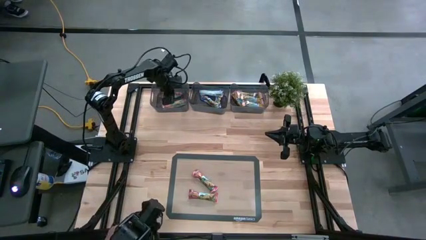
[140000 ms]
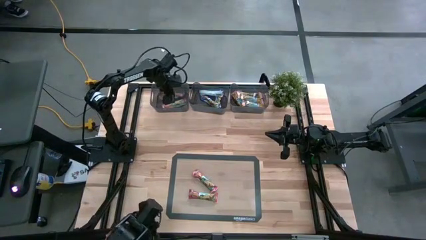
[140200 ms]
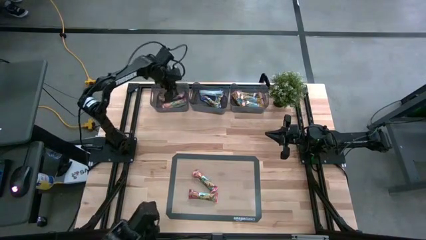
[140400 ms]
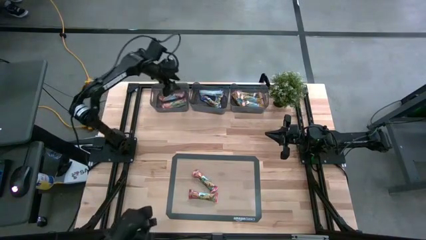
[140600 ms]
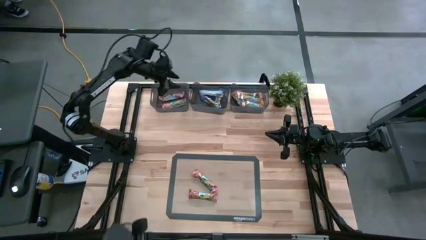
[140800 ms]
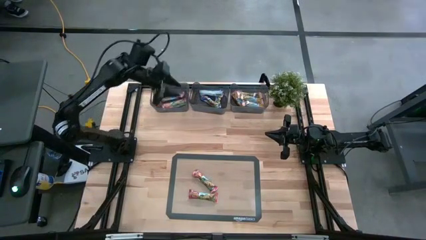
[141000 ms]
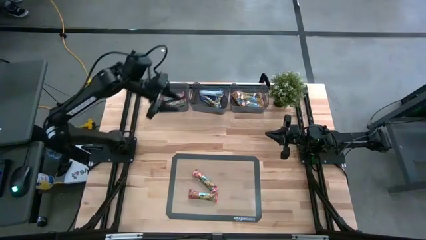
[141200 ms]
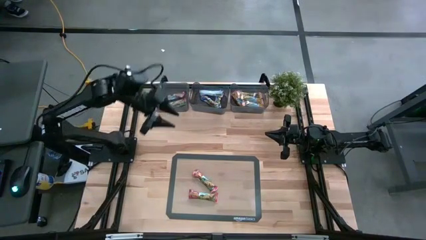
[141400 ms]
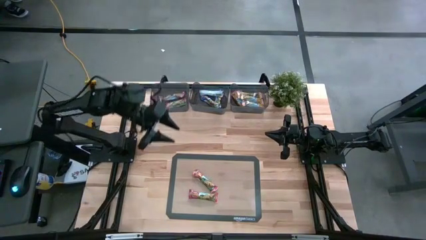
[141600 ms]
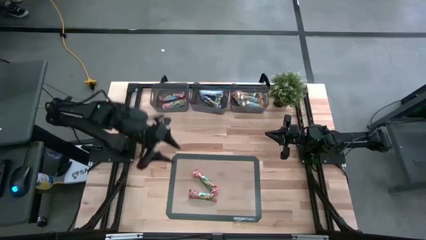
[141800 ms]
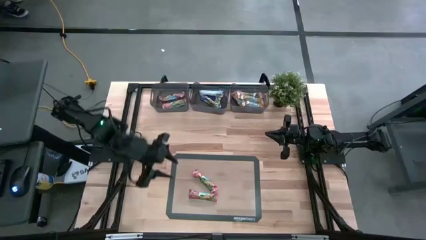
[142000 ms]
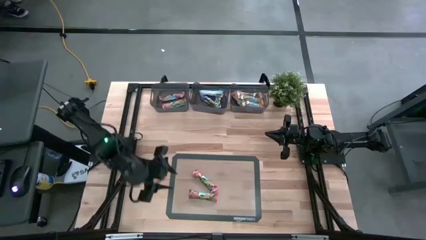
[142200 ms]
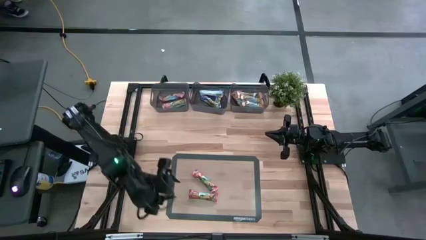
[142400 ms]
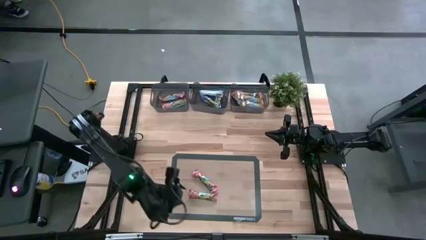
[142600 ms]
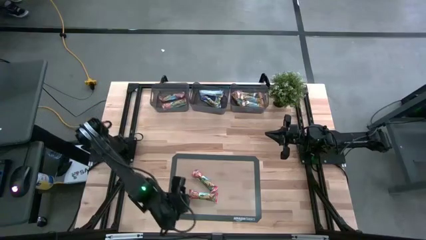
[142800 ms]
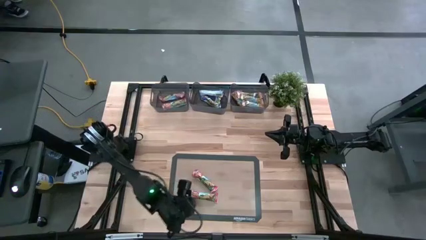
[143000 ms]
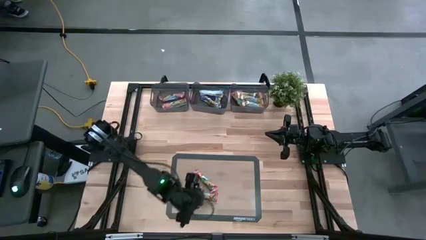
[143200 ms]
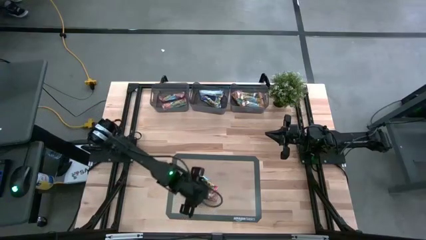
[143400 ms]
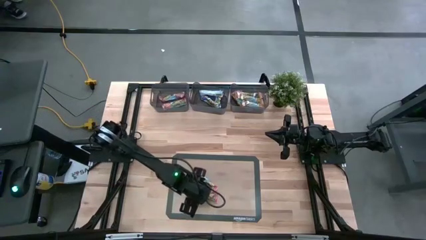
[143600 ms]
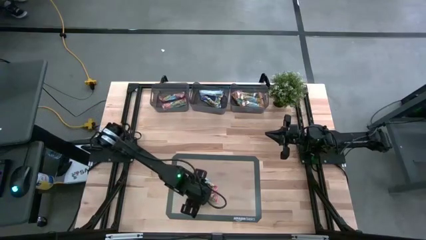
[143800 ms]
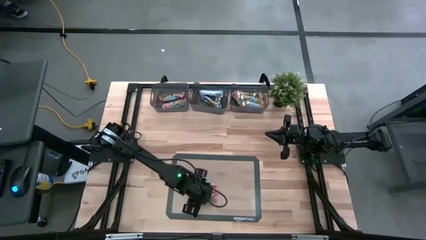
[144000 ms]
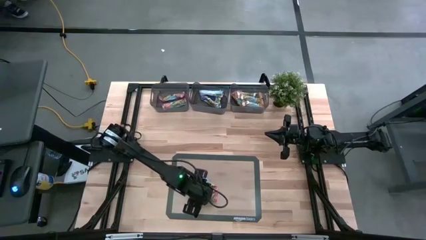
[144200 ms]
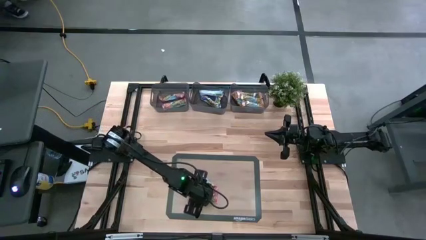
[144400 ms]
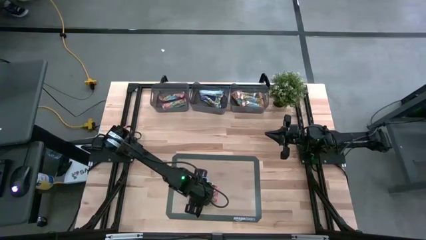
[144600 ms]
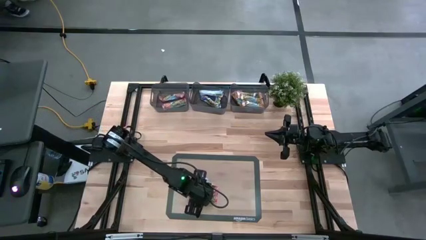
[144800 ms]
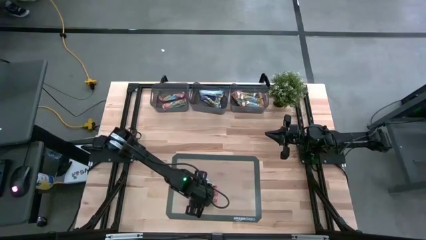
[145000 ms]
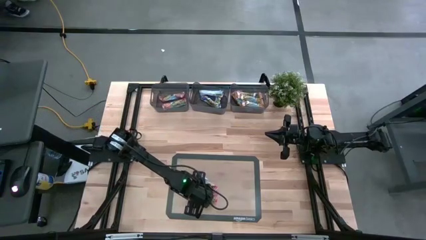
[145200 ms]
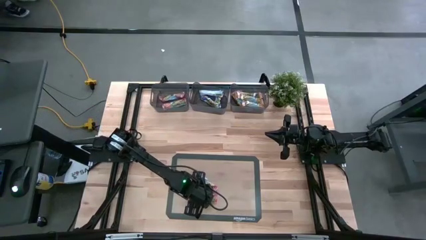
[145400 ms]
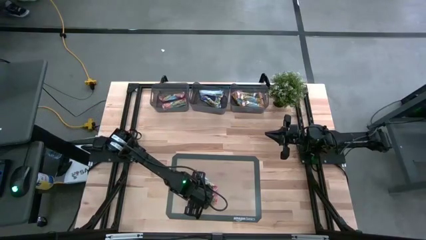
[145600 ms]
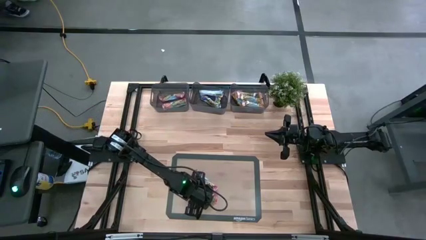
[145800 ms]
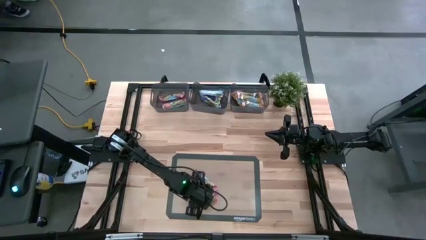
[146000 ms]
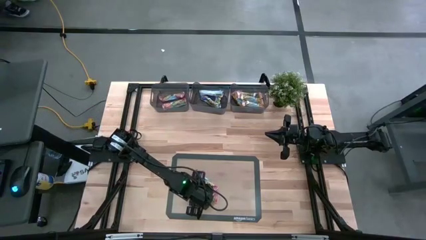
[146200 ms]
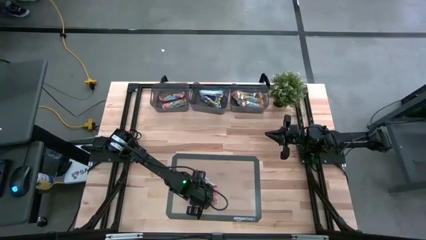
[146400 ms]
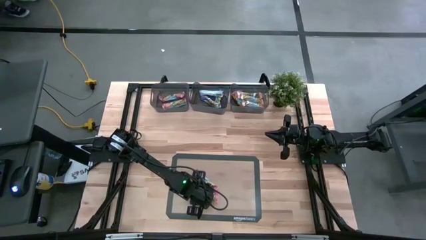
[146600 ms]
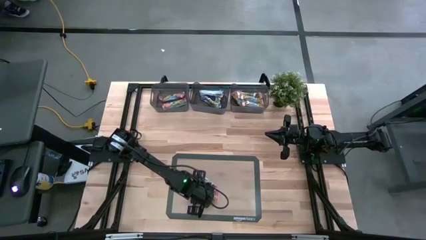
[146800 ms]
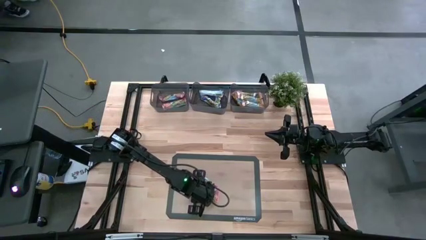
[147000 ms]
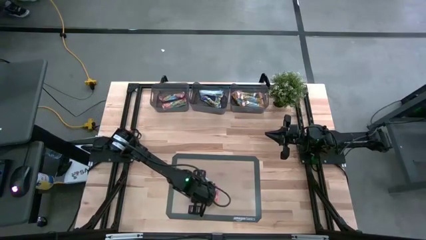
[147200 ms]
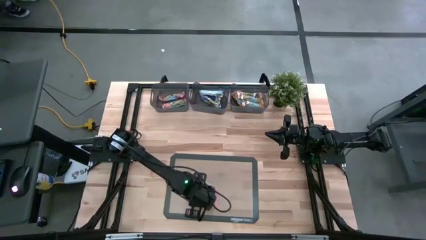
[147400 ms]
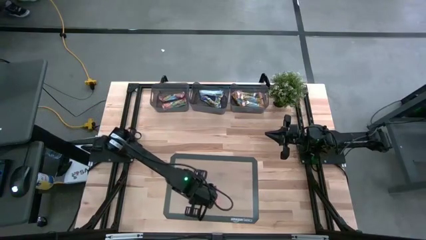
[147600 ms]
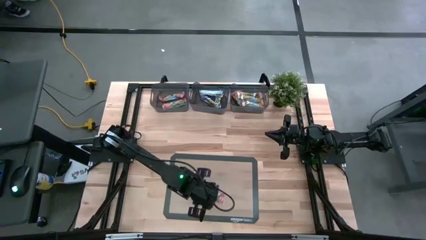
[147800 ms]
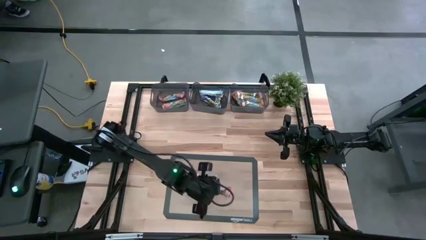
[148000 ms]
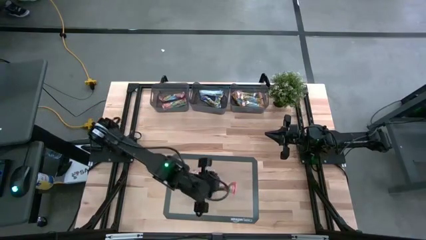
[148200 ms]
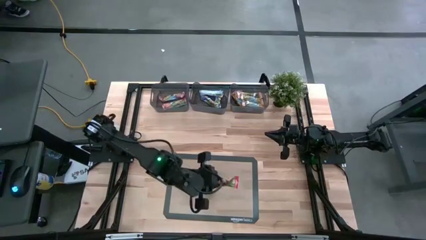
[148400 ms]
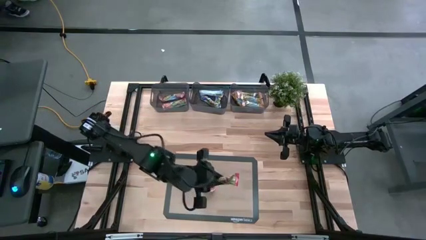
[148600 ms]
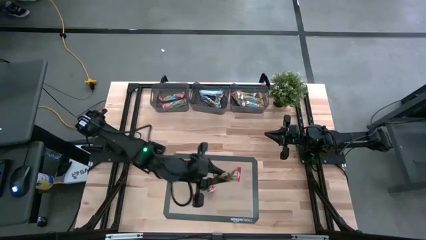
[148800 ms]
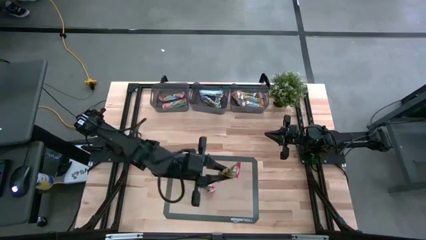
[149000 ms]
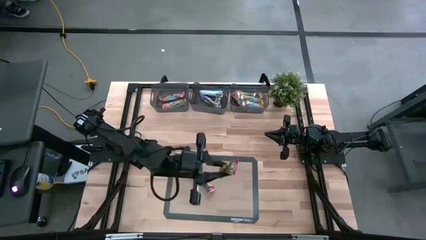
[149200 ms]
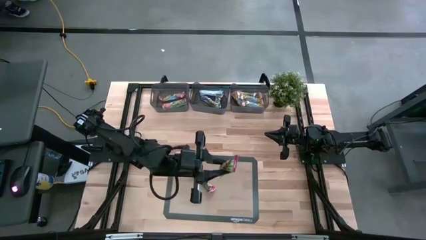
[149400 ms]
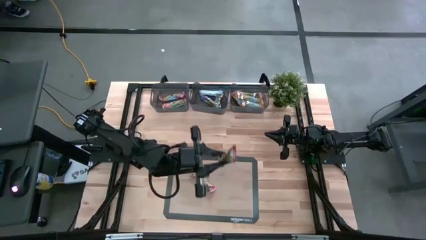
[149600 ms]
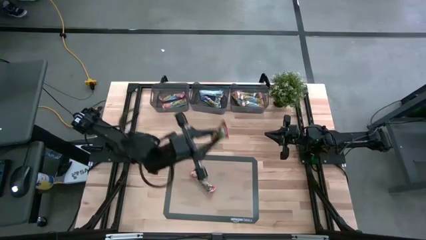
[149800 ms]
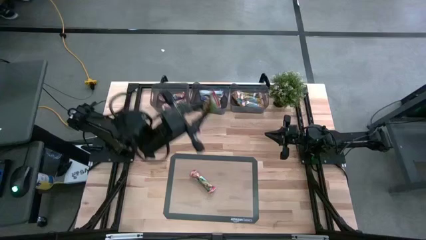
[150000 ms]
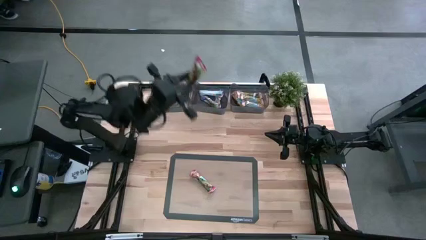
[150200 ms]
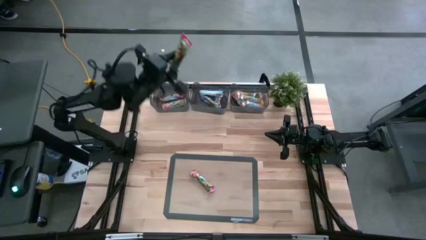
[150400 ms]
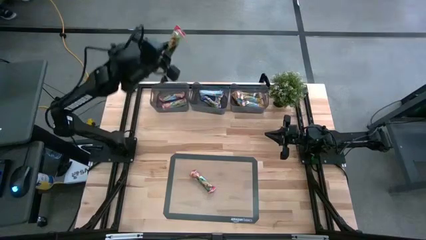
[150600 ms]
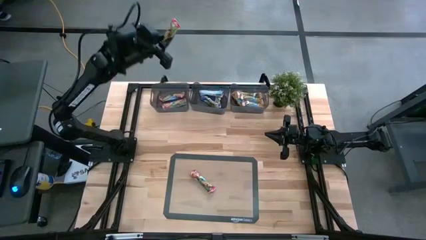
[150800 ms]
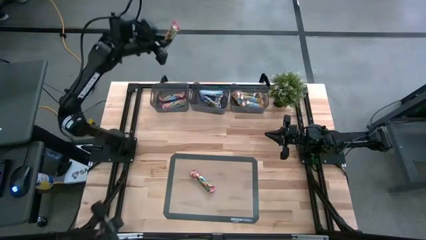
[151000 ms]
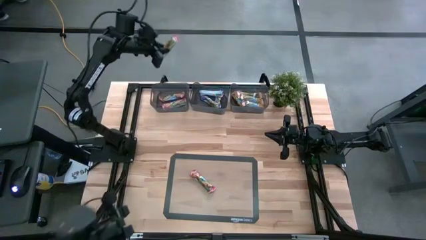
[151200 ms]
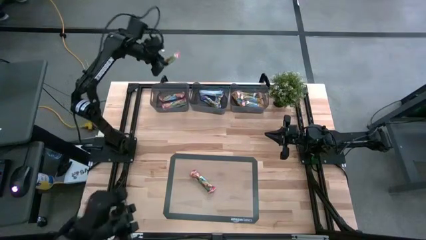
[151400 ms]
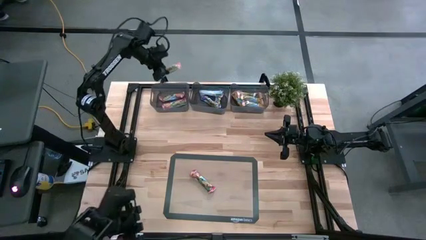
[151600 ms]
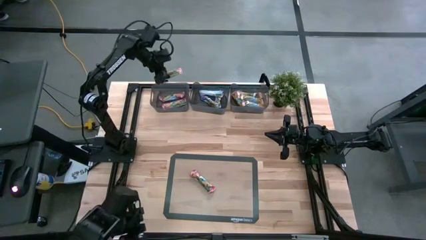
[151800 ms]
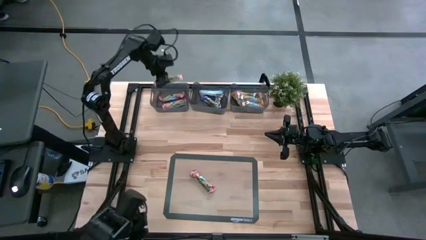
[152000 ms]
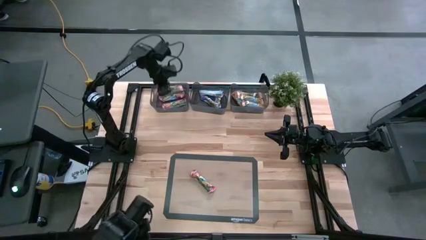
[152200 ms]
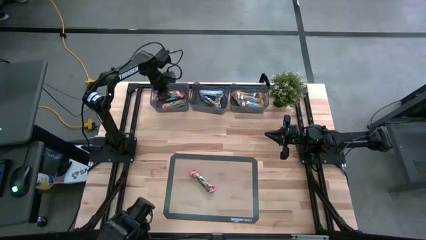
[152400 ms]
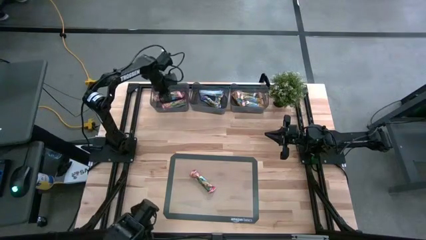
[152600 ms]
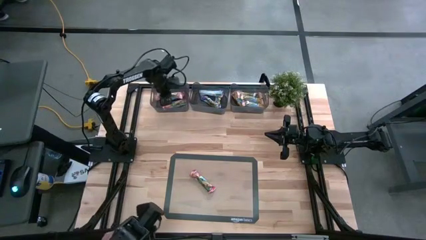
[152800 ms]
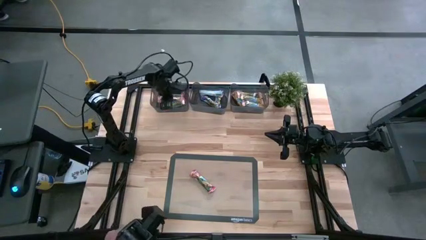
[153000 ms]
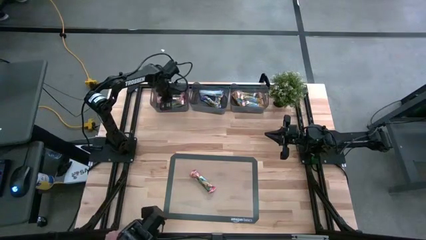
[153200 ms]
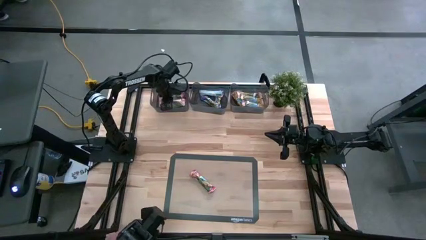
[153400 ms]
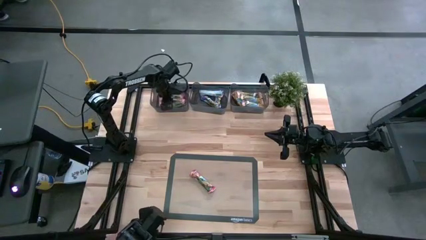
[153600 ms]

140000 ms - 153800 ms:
Task: Pick and place Granola Bars by type
Put the red granola bar into the left black bin

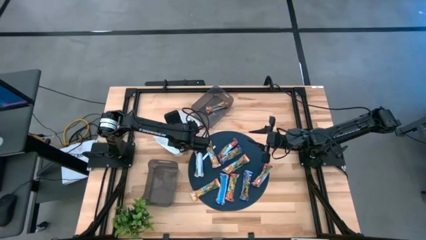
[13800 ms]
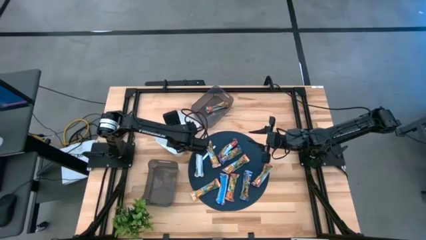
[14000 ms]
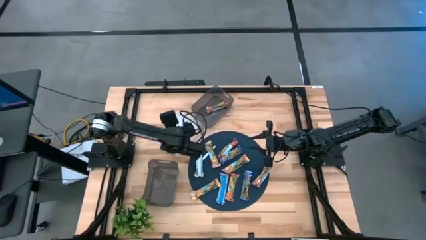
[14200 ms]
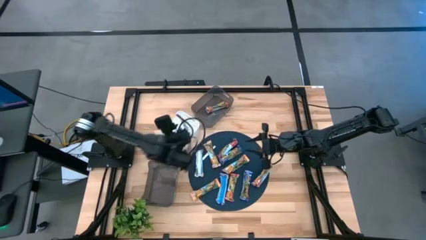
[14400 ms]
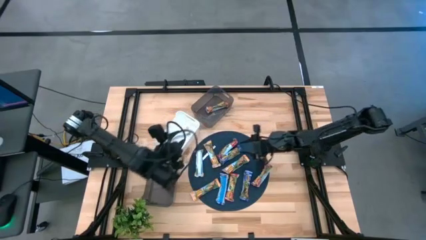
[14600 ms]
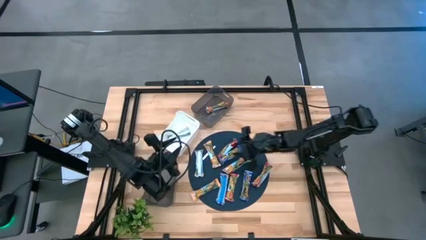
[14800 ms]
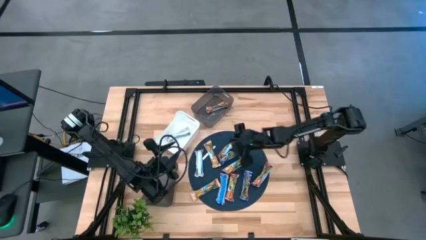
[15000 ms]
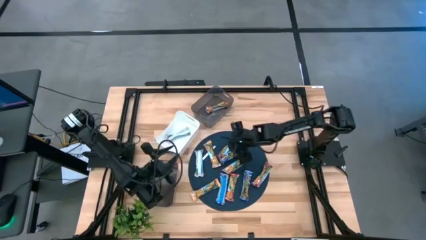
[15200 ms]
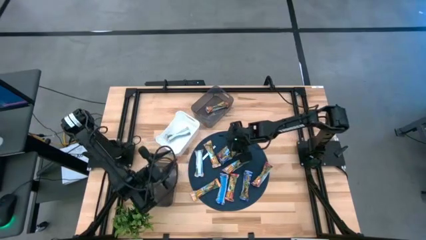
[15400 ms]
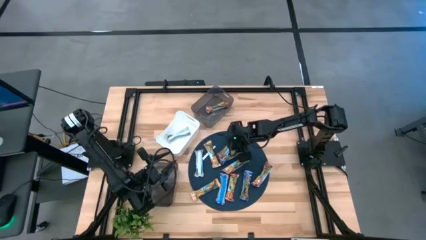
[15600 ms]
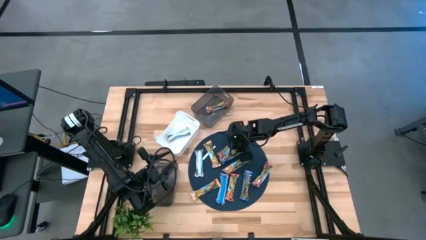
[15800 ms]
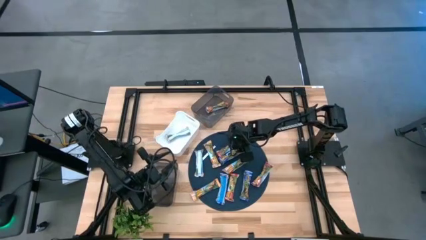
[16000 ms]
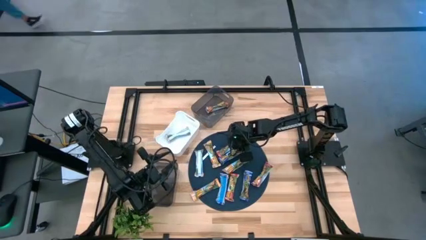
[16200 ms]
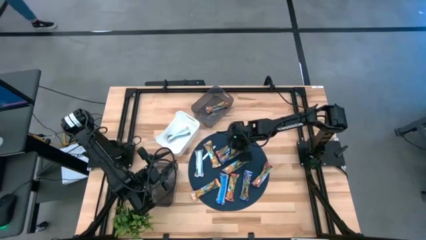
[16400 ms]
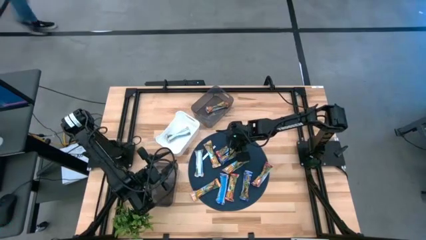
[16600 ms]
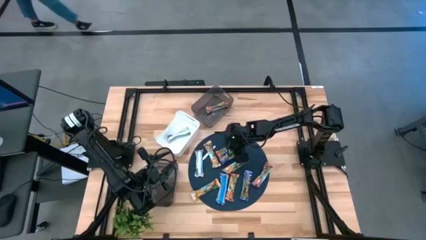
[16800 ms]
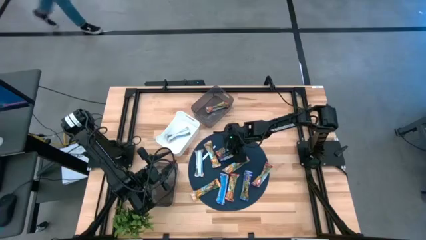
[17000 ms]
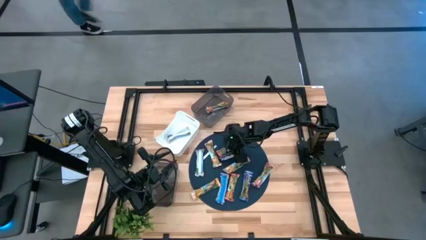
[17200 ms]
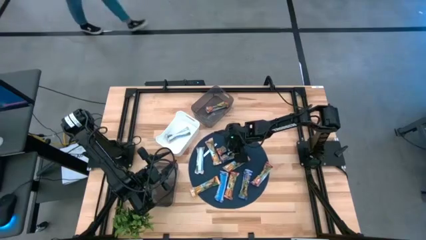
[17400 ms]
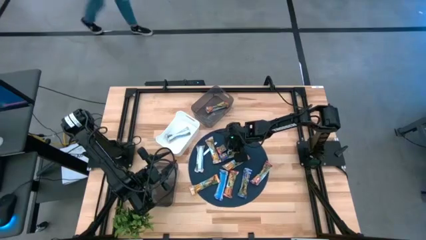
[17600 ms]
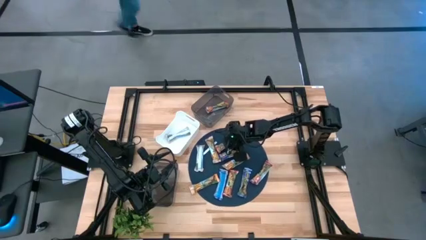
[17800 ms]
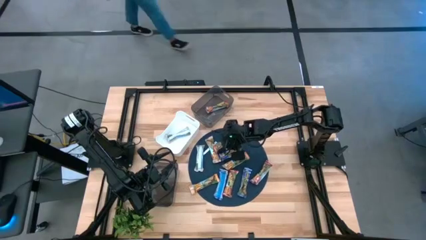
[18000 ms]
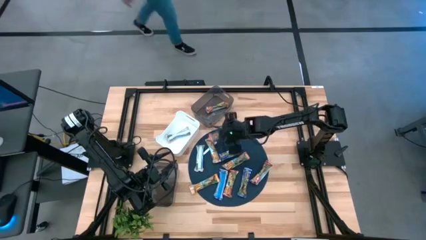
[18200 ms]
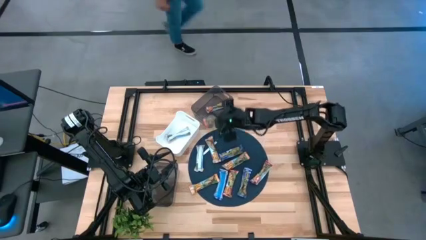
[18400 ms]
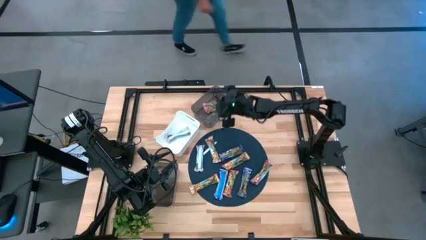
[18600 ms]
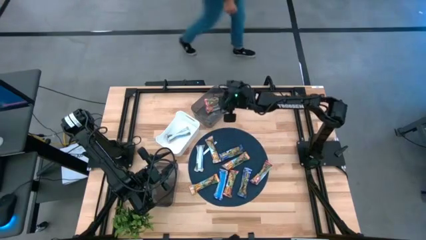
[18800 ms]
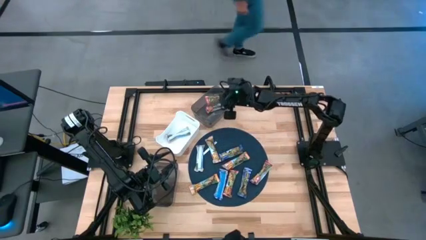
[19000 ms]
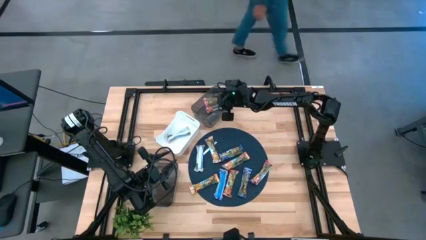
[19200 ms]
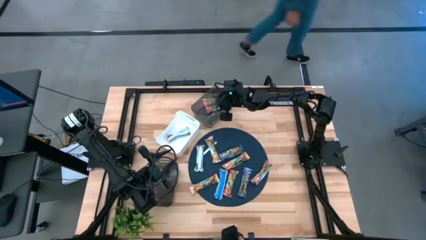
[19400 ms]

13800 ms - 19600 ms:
Task: Pick and place Granola Bars by type
Put the red granola bar into the top black bin
